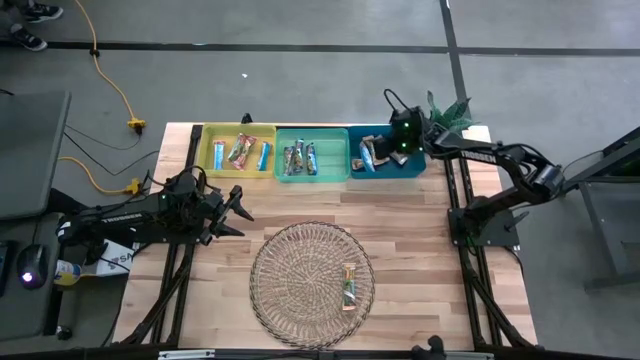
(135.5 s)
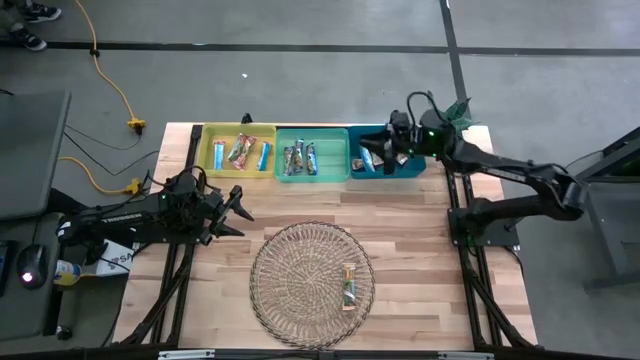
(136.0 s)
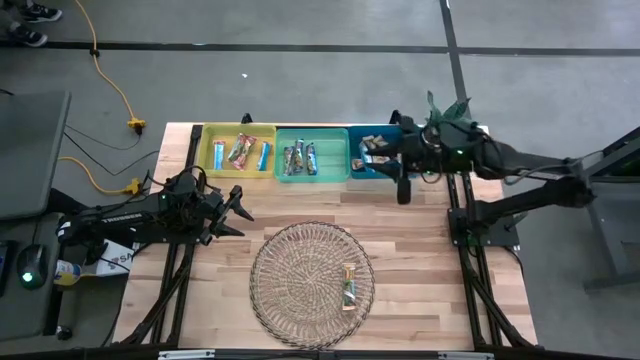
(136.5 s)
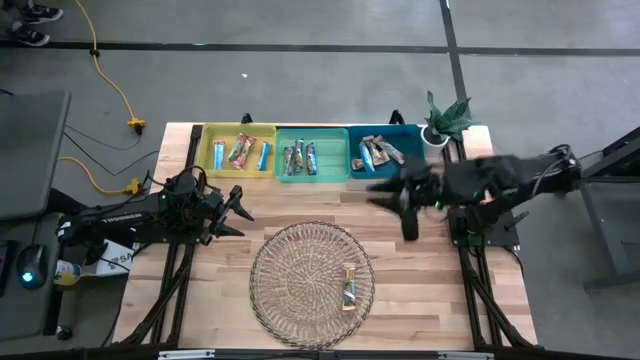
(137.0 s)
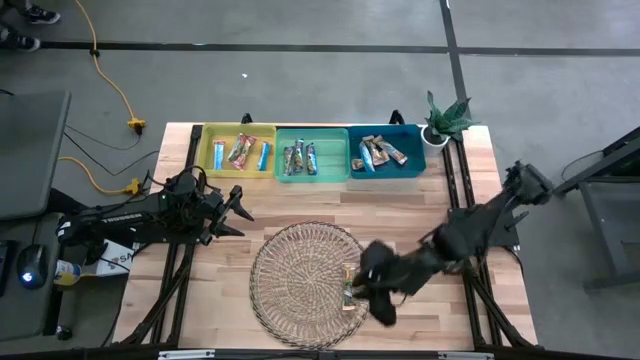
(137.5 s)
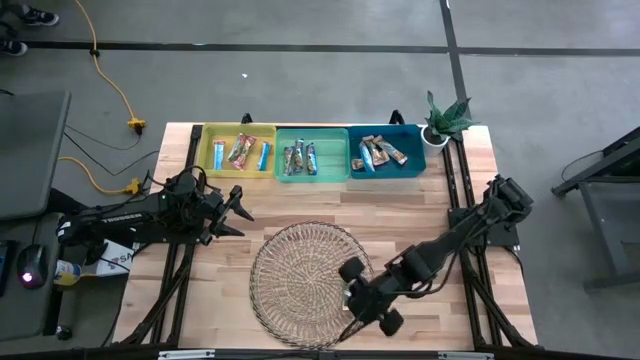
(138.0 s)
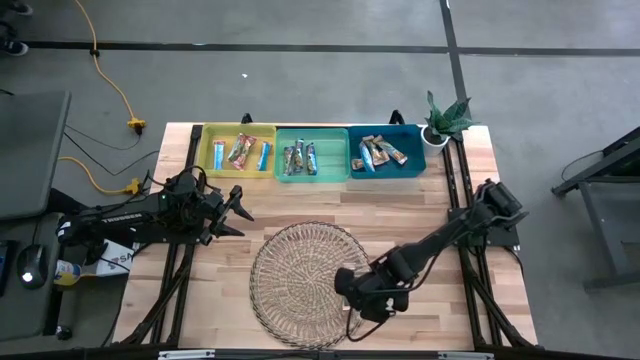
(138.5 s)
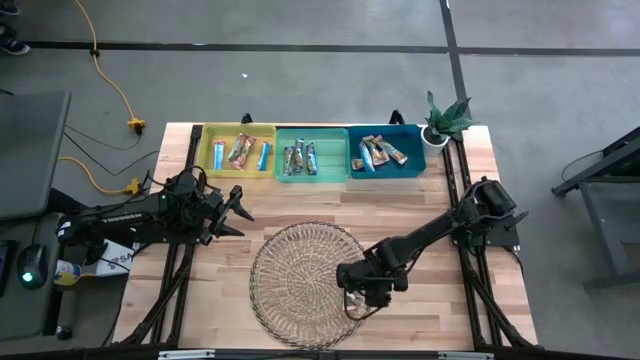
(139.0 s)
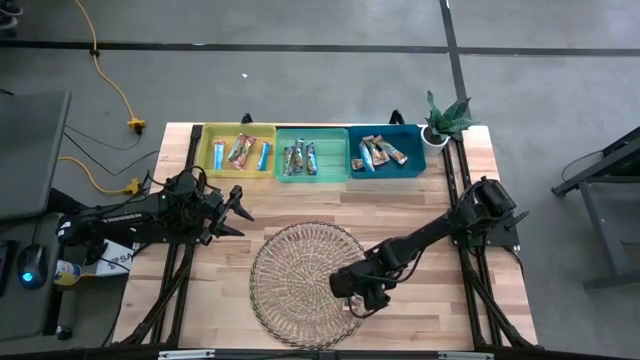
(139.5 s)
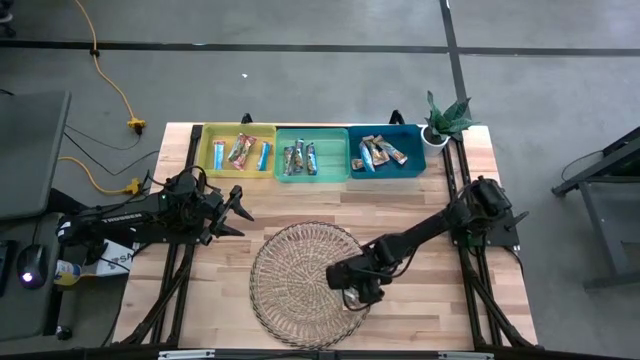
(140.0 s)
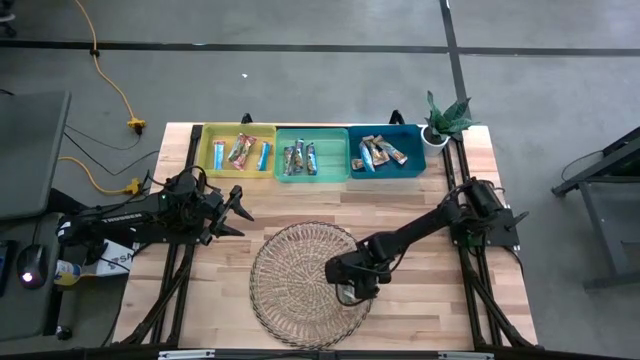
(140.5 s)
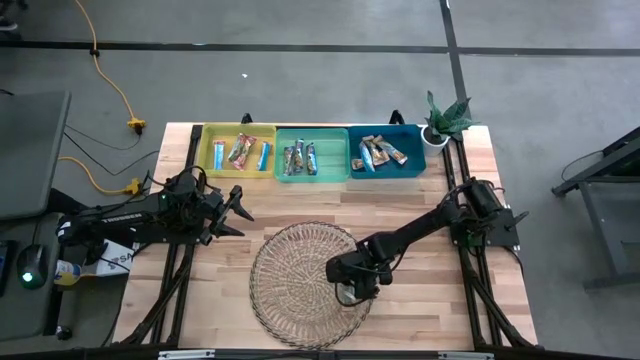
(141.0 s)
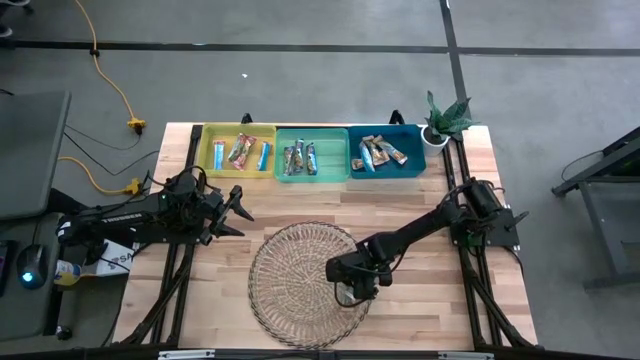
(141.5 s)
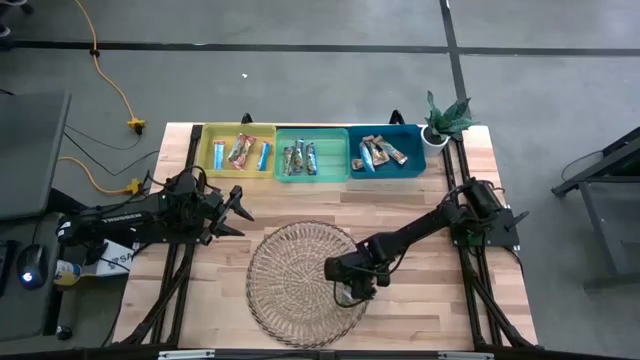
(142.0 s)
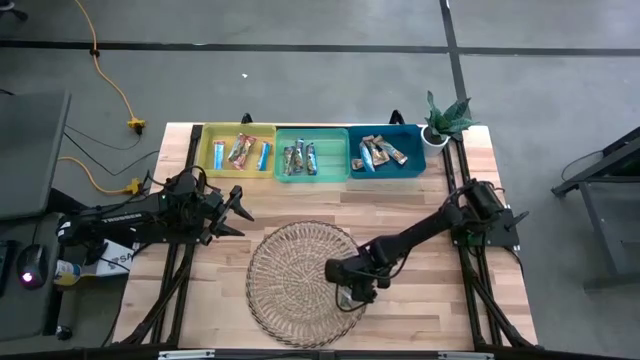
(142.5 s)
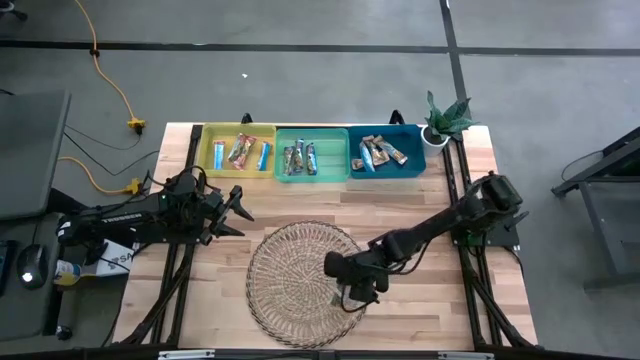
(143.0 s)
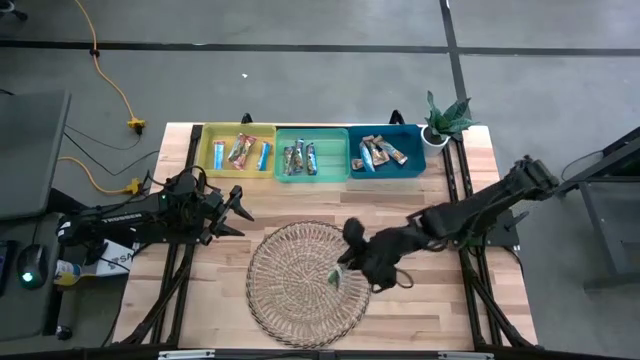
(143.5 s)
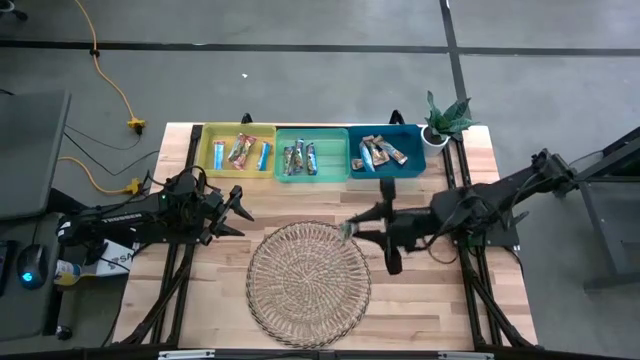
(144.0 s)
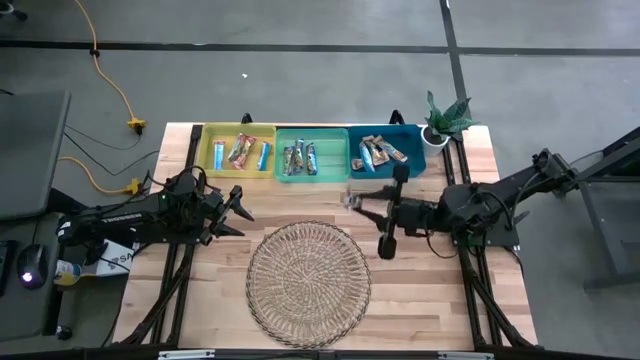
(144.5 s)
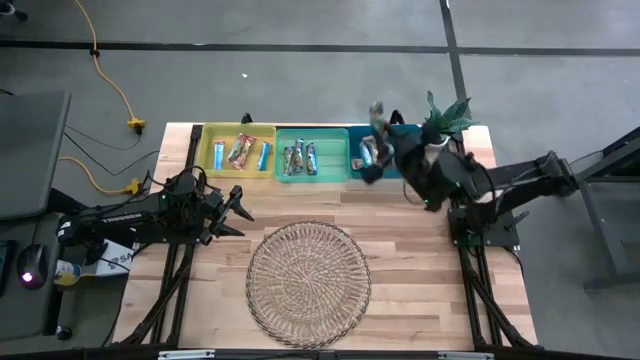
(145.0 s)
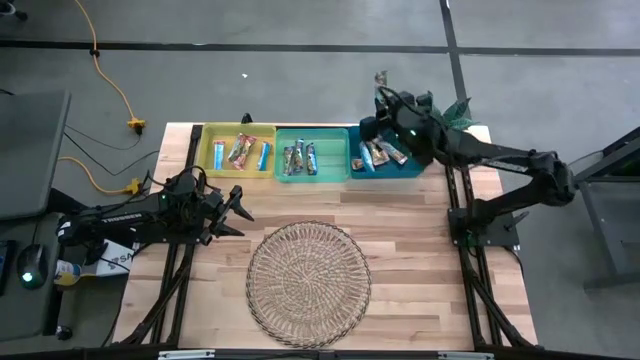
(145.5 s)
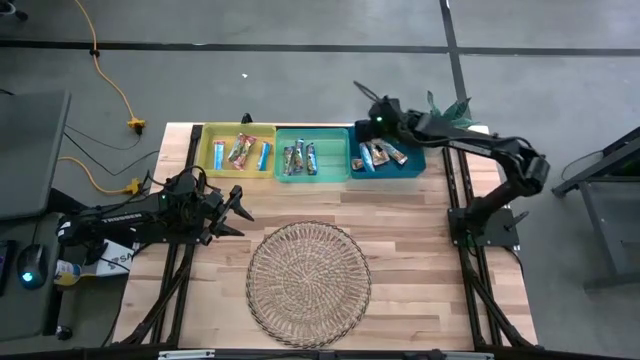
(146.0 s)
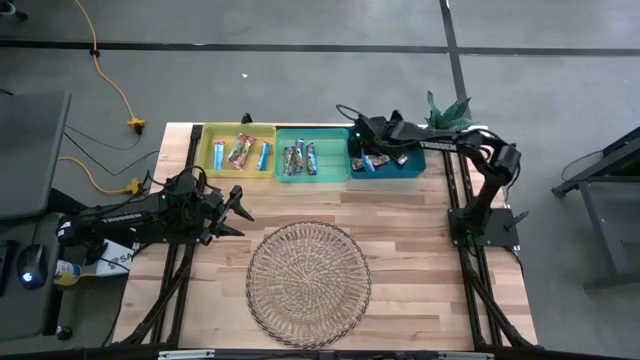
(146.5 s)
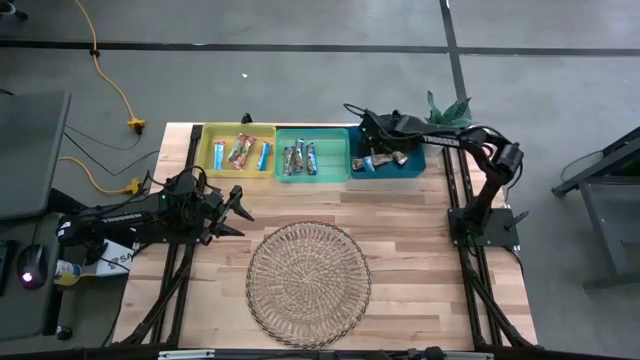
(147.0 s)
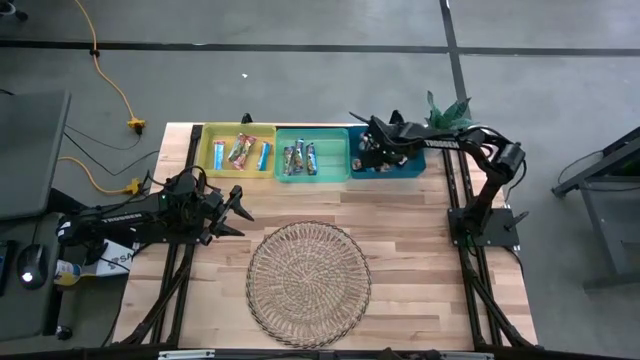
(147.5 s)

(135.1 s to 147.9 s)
Task: Pick and place Granola Bars by type
Put the yellow granola bar into the blue bin

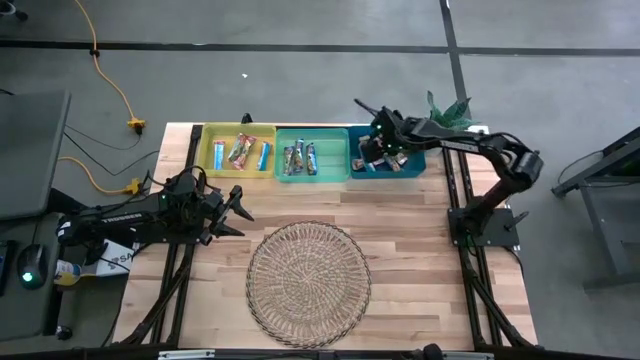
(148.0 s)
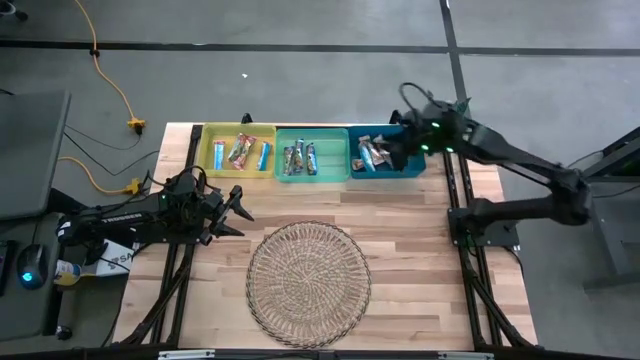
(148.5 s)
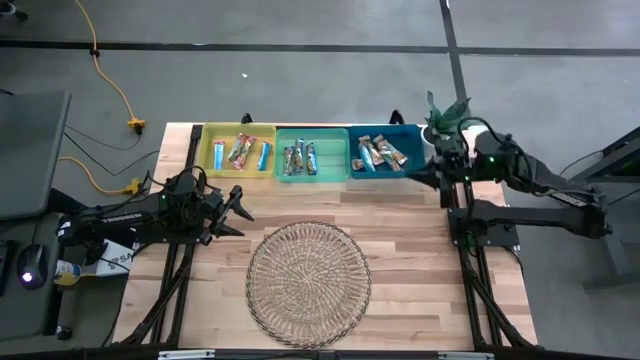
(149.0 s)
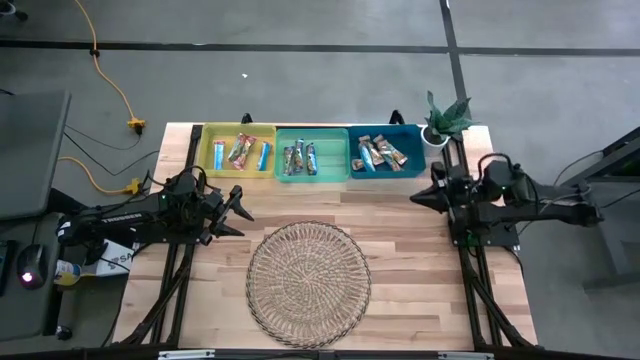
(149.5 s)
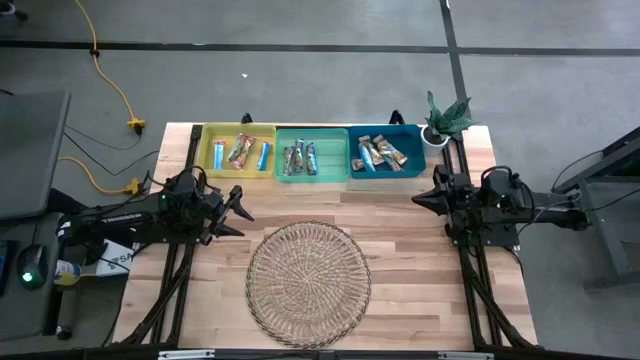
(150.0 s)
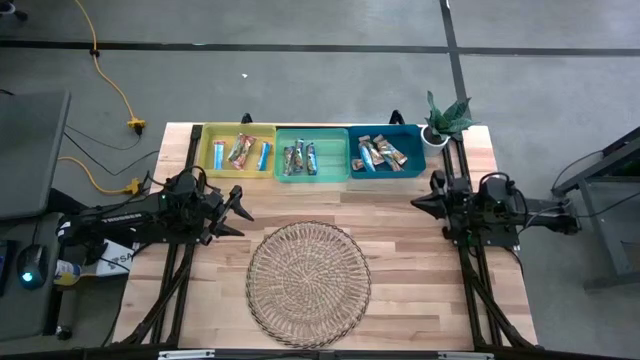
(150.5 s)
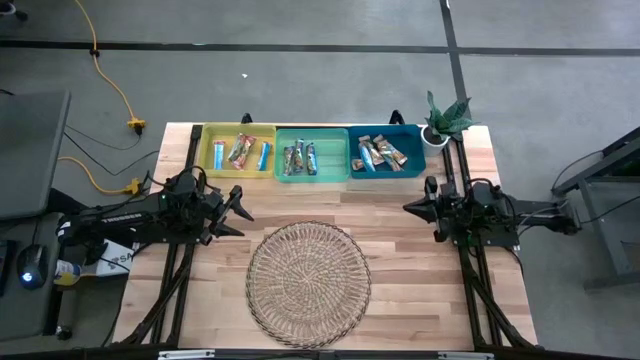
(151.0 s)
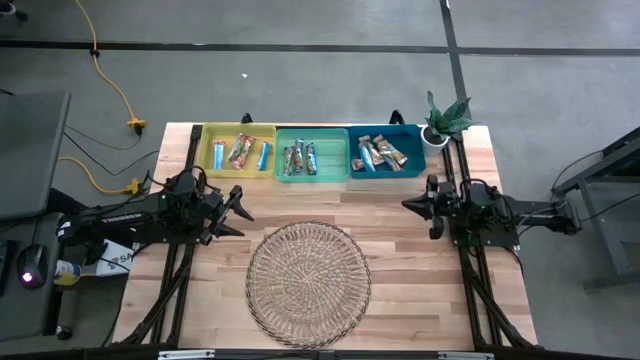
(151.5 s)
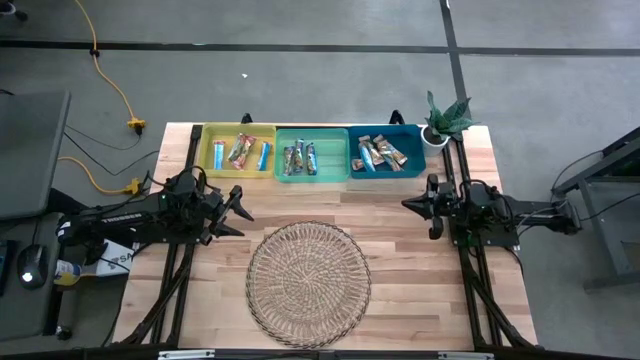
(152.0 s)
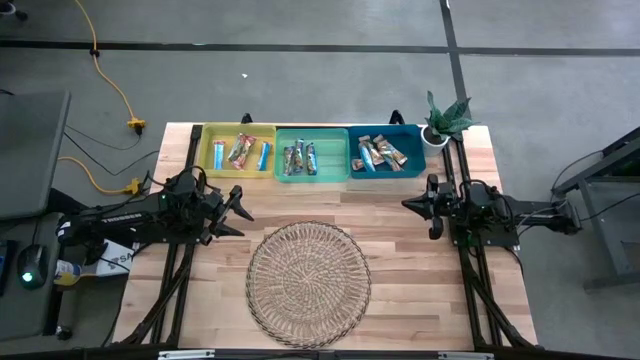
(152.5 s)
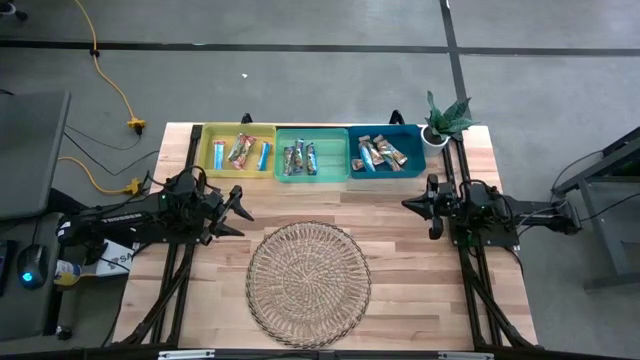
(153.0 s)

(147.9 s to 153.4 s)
Return to Home Position

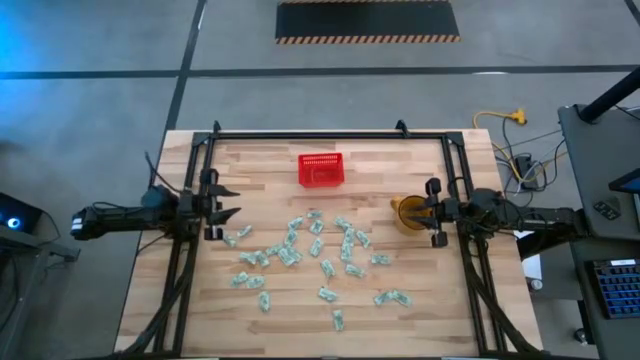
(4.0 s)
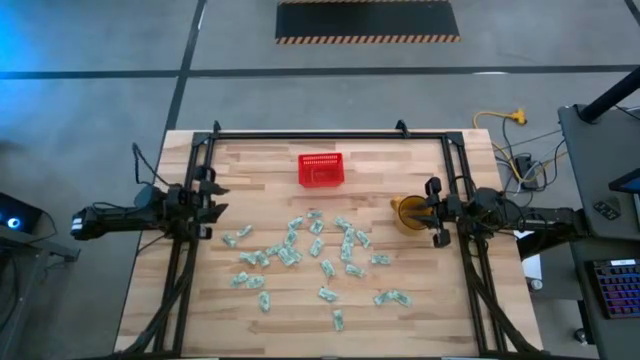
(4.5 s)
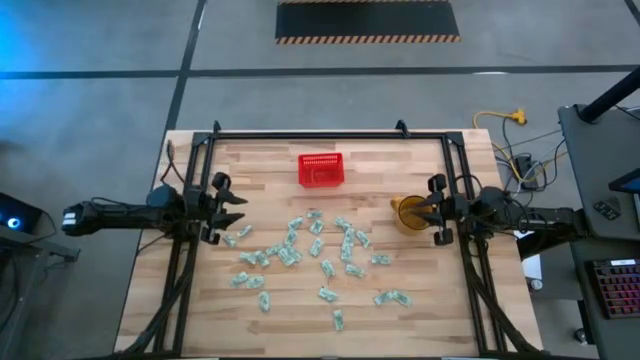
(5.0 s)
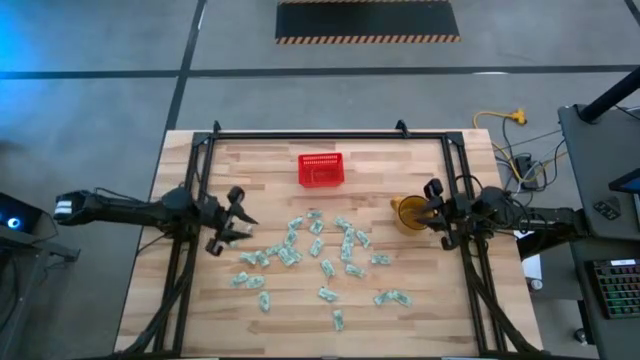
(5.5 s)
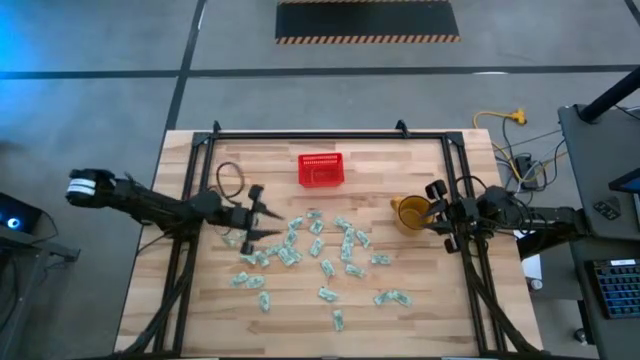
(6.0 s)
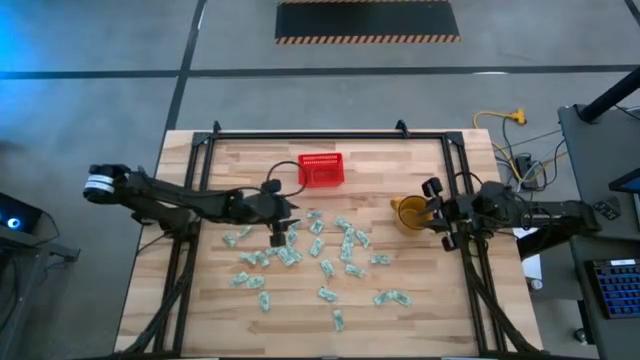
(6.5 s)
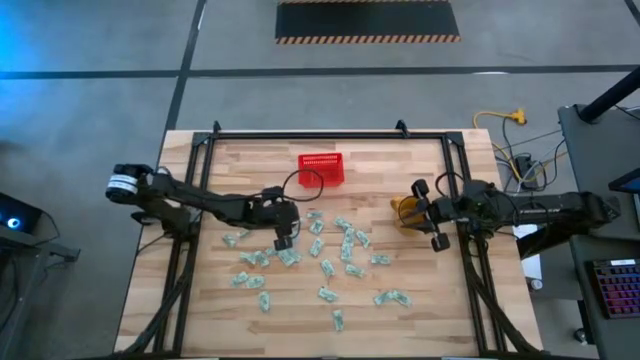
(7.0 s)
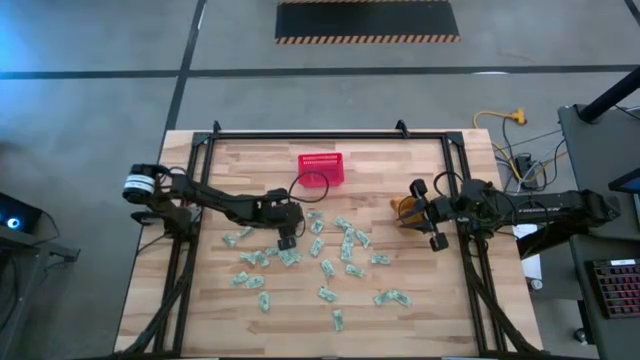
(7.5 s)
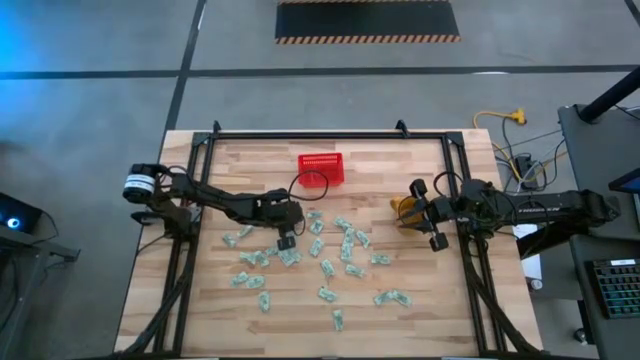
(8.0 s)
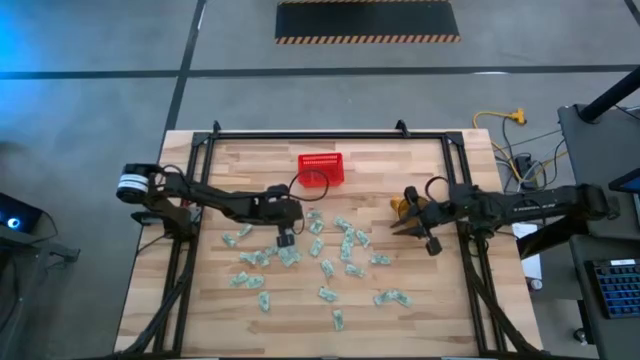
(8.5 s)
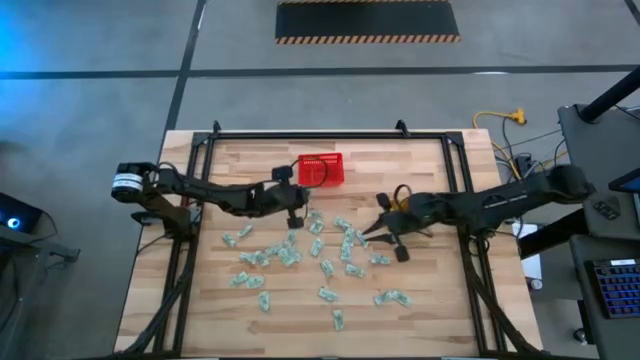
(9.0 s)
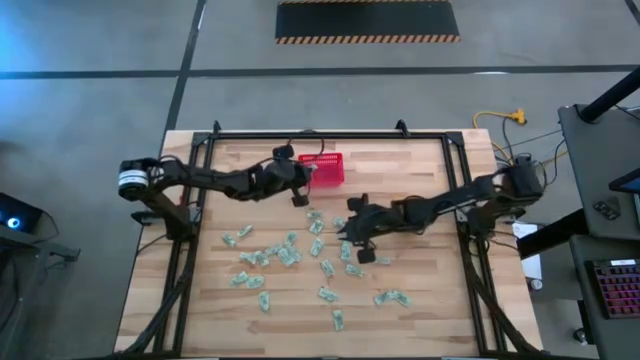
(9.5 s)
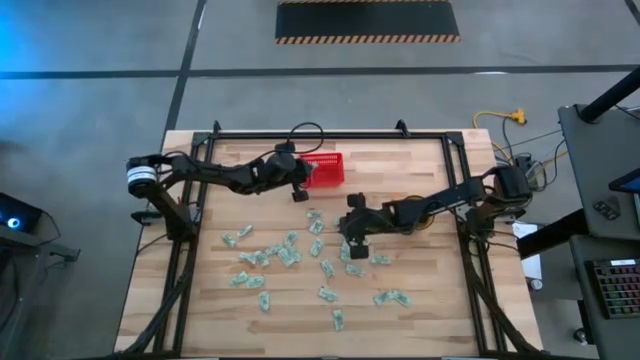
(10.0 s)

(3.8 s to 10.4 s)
Task: Pick and place Stevia / Truvia into bins
Put the white stevia packet into the red bin
